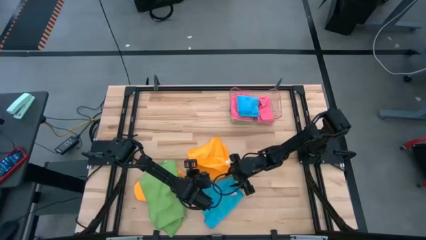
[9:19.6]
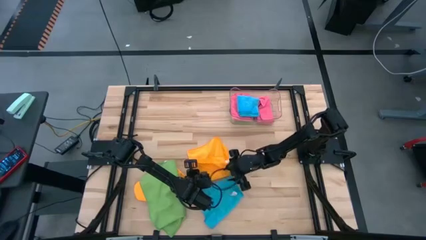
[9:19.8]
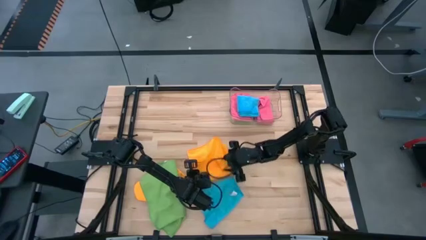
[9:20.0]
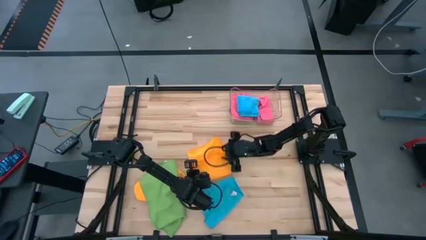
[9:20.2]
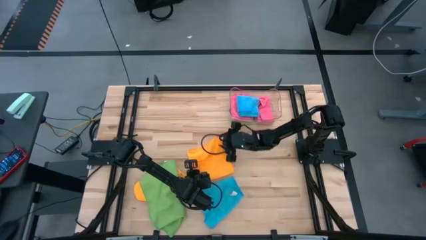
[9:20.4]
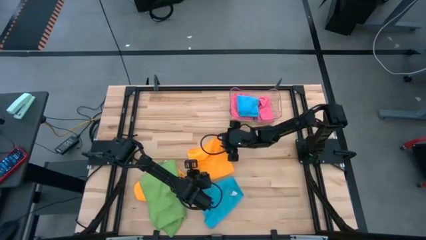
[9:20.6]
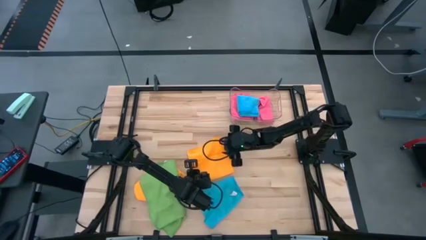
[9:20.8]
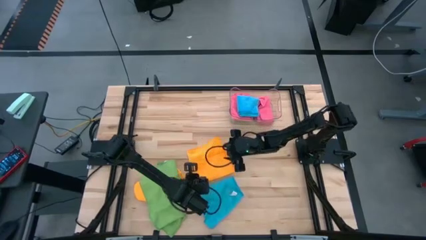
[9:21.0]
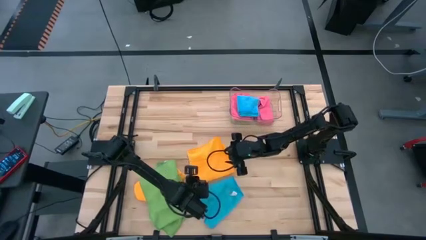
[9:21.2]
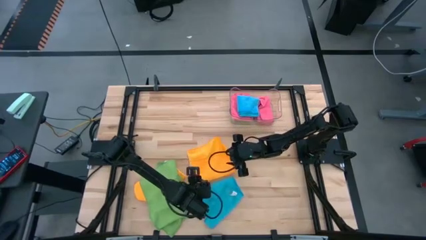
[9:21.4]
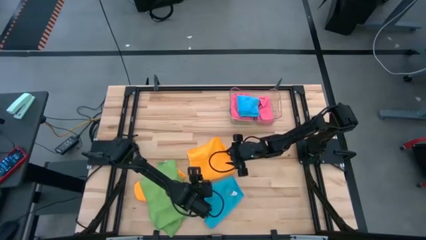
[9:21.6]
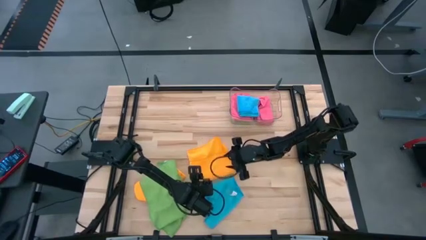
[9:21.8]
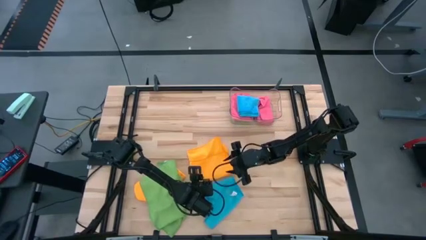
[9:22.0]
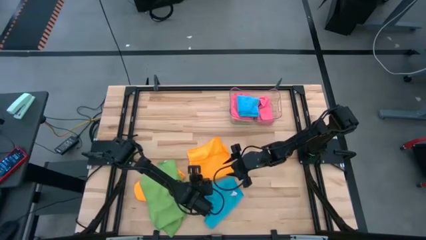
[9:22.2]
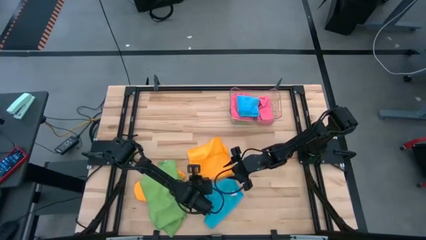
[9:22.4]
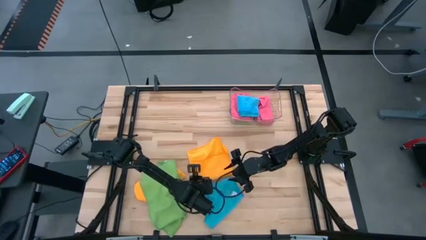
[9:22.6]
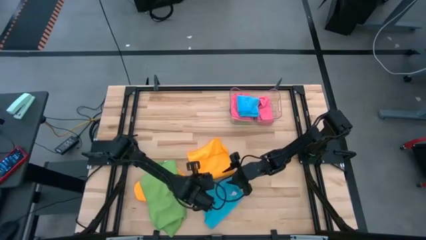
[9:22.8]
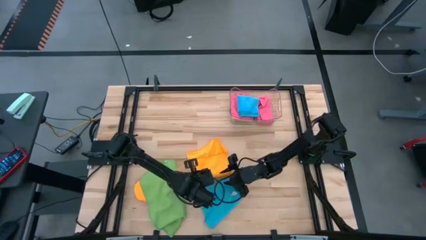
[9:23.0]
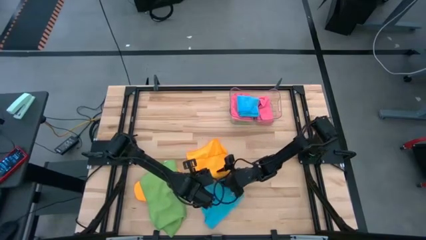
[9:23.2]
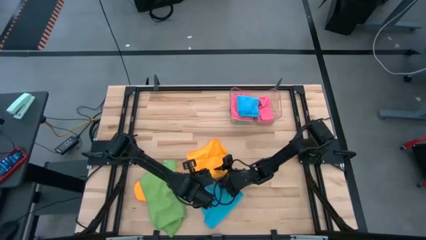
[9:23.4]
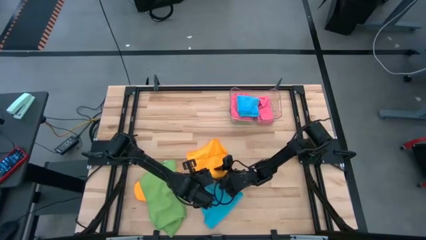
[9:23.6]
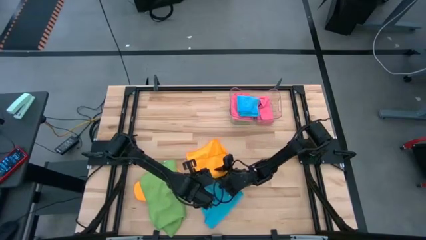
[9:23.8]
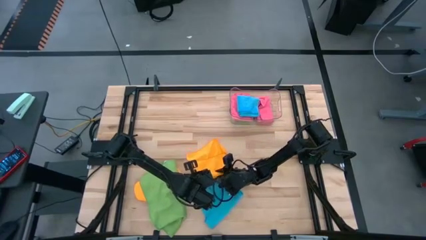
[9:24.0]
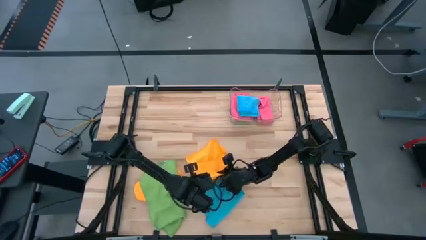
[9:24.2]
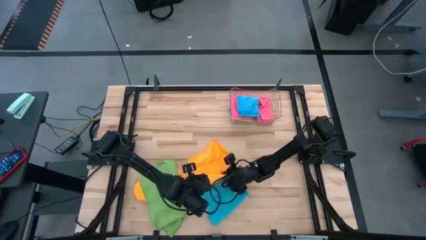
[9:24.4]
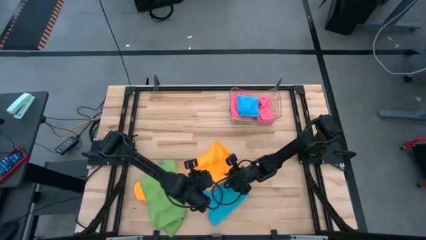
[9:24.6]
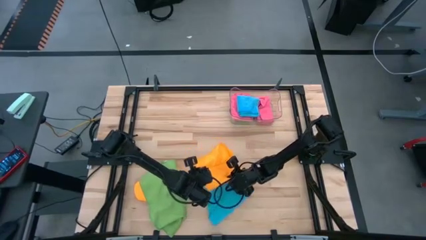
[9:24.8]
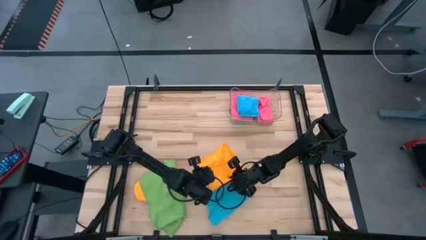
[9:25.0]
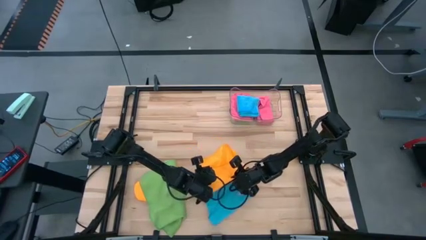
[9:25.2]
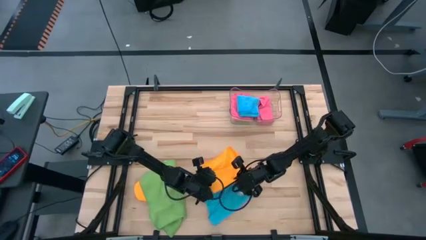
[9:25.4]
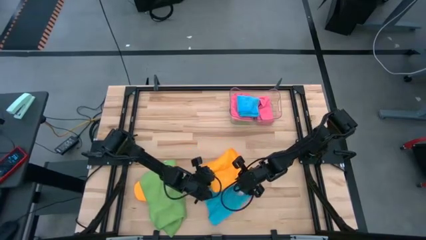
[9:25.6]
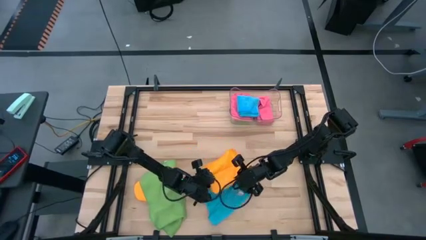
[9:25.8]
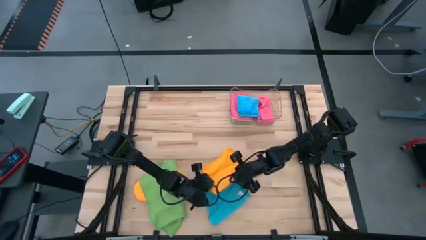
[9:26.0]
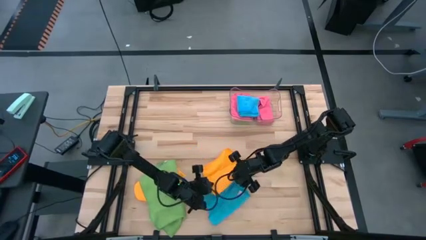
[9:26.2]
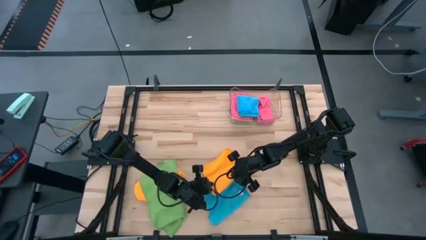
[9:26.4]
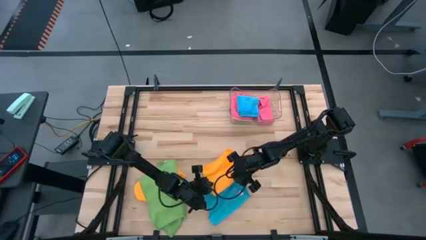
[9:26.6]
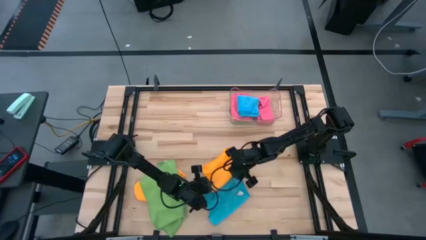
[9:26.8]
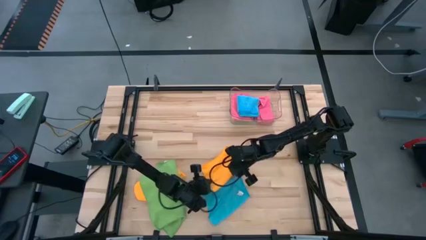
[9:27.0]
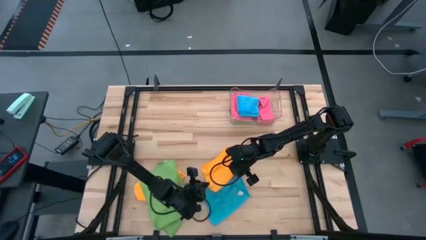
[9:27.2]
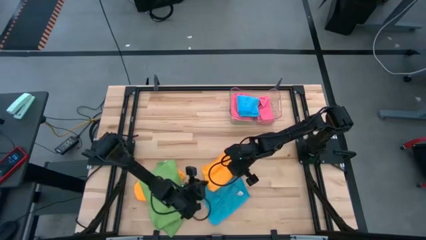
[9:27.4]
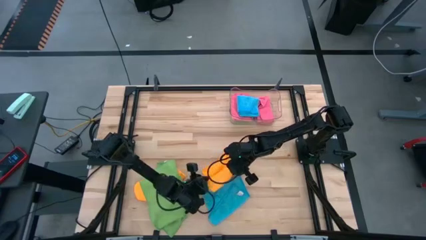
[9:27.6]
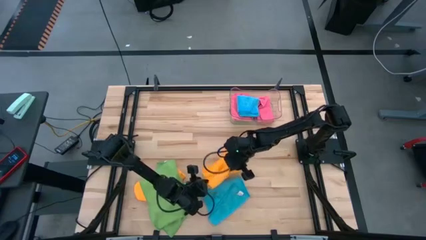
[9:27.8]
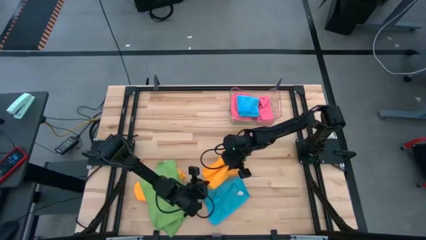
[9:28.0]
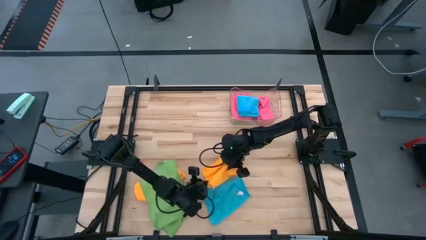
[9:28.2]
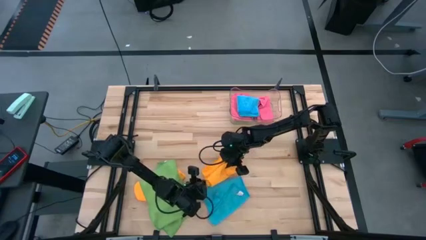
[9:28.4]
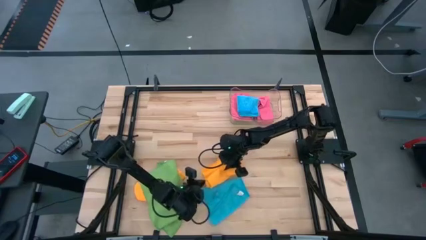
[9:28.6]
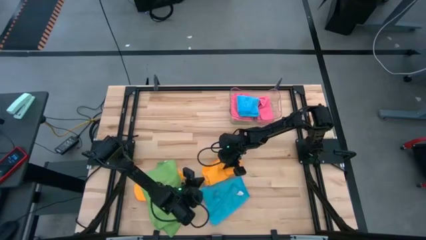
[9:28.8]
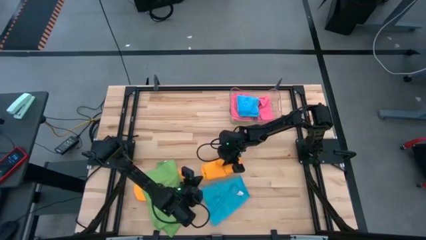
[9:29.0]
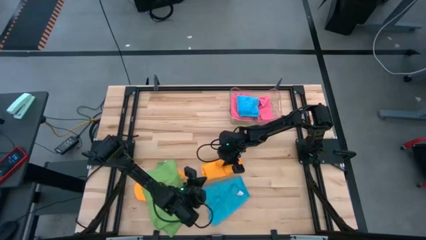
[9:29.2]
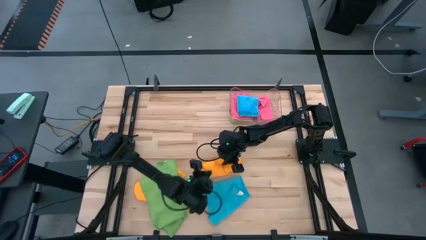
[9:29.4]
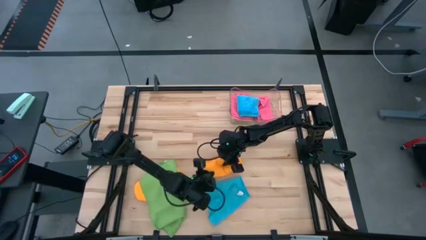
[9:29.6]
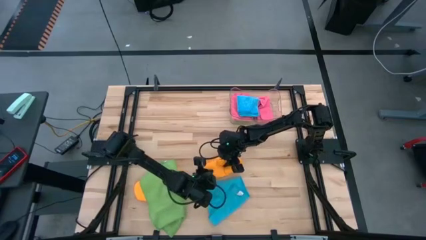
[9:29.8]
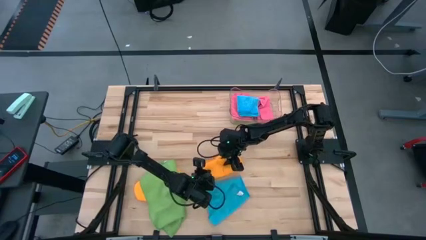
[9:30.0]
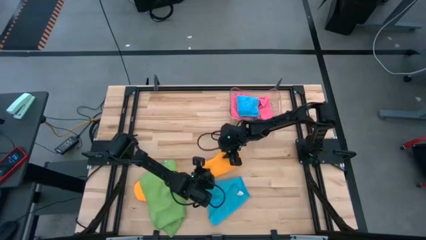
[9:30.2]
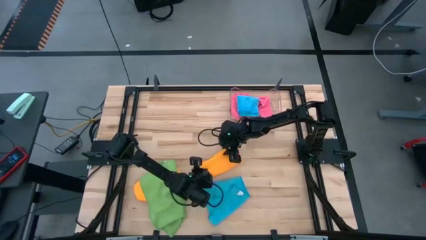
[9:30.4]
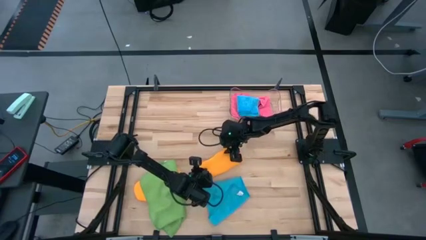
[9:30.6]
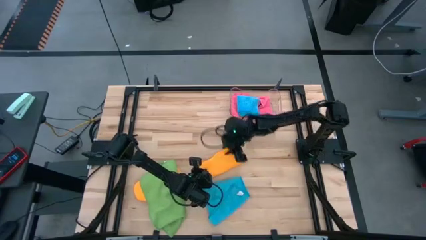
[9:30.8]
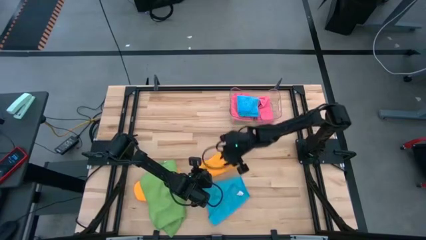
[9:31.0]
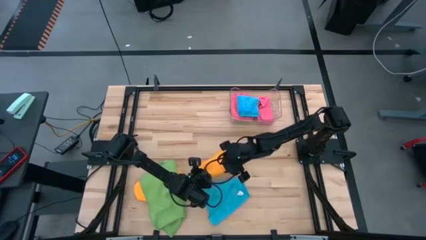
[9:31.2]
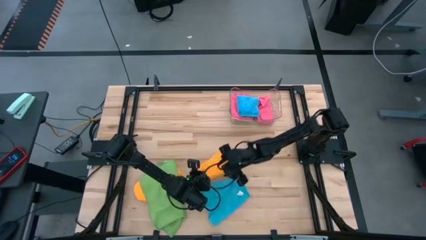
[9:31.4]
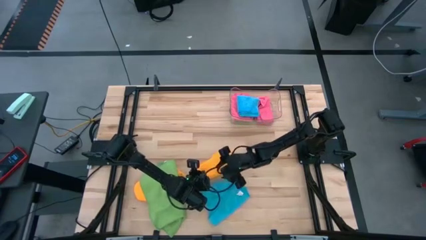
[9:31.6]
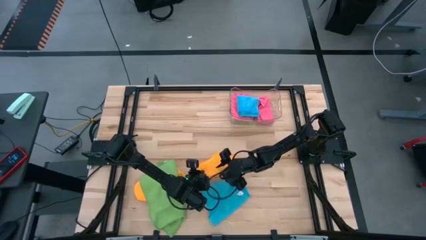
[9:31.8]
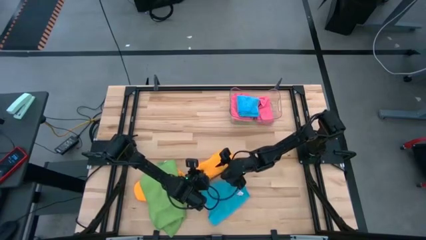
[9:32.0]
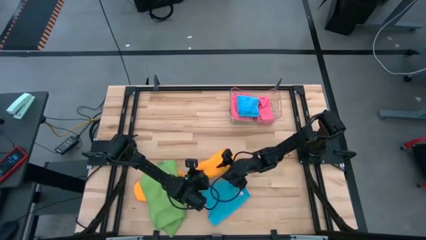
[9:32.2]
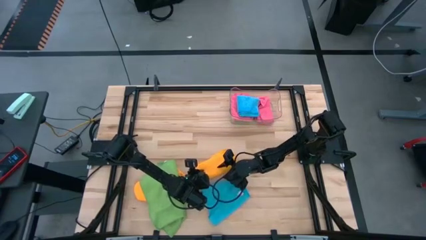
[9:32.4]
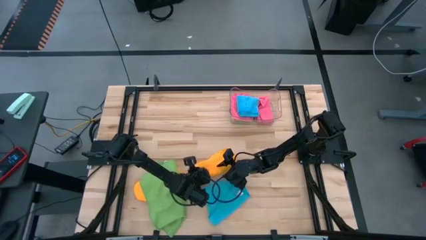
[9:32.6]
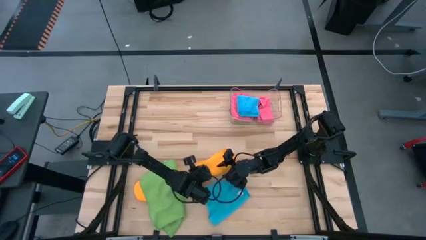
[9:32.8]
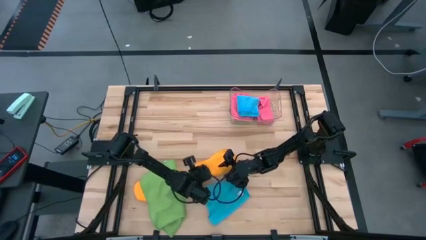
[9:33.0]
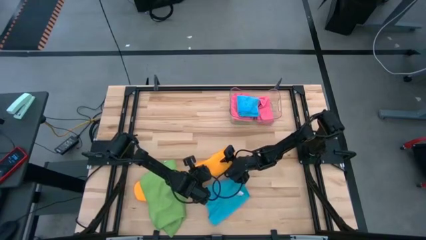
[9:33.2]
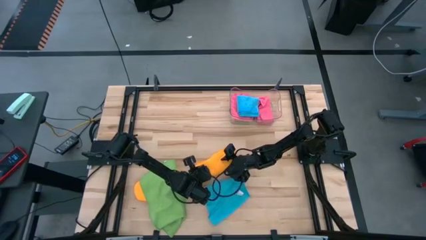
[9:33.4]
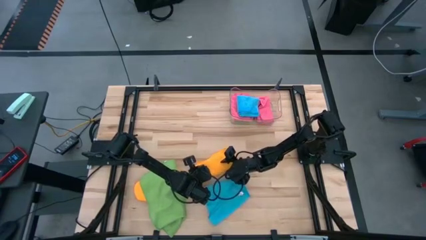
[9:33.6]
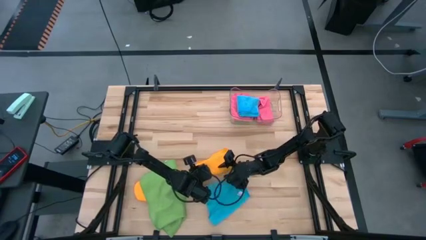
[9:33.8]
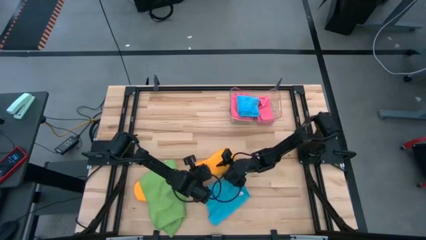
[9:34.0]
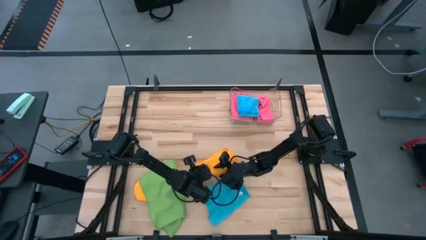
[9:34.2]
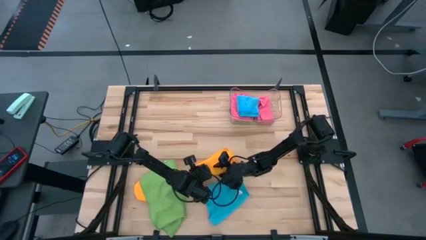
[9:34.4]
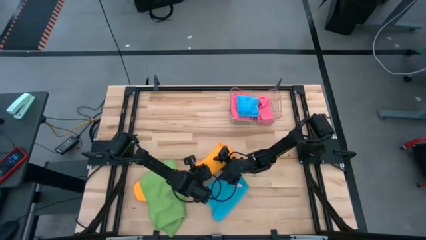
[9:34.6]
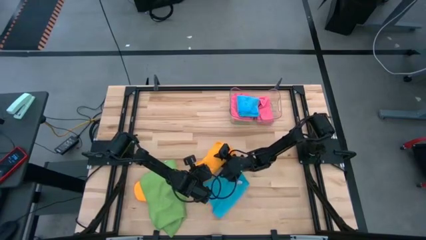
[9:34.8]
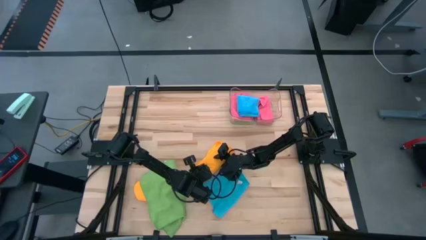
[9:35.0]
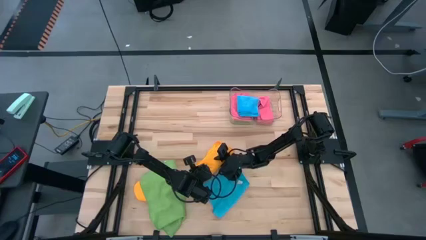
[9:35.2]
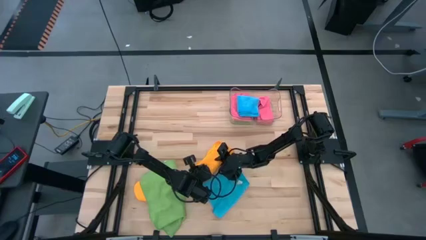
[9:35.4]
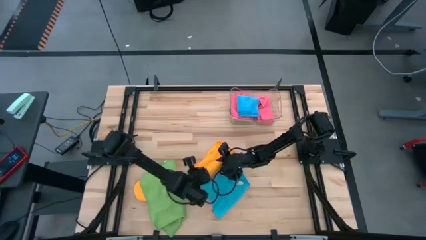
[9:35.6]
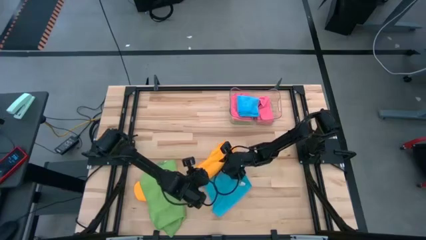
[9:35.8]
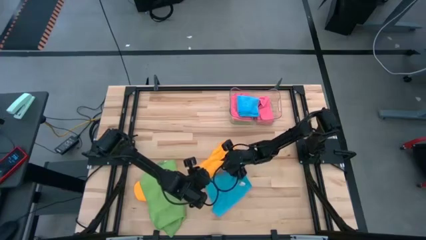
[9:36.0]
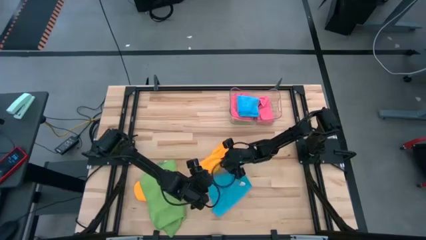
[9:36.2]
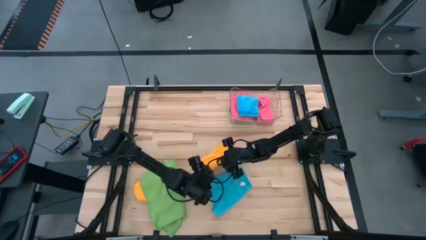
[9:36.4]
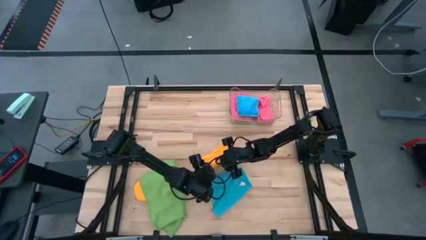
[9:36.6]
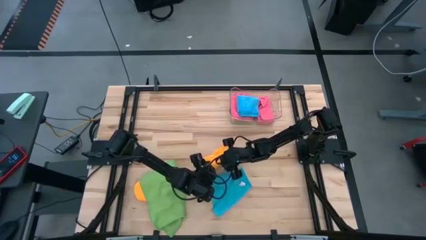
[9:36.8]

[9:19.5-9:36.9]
Task: Fold microfiber towels
Fold the right yellow towel
